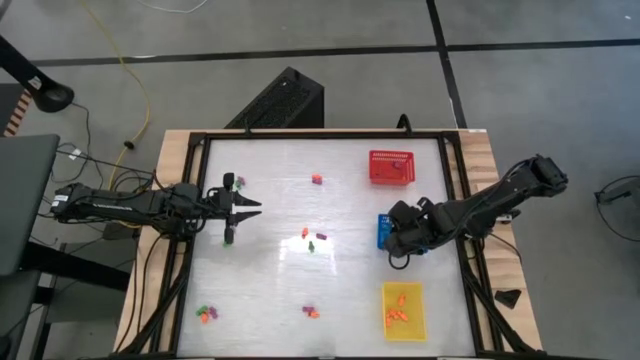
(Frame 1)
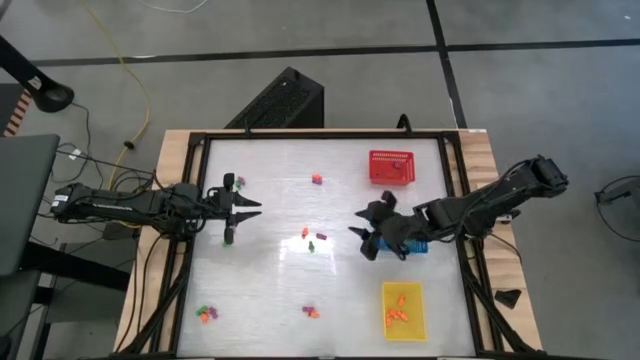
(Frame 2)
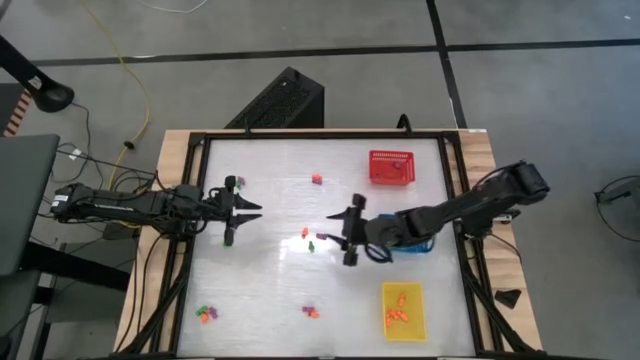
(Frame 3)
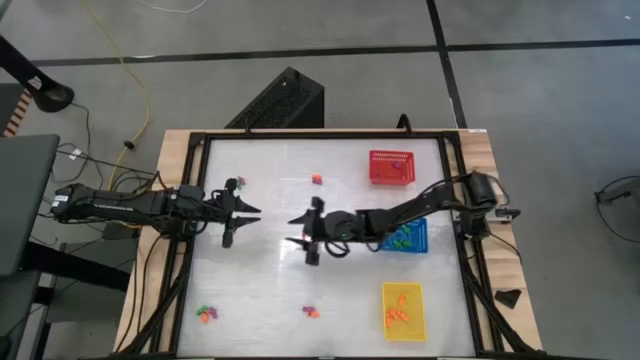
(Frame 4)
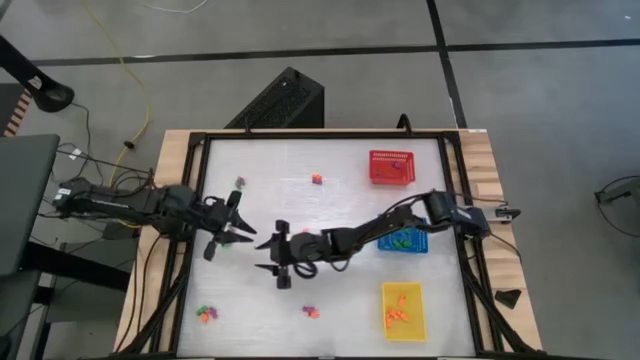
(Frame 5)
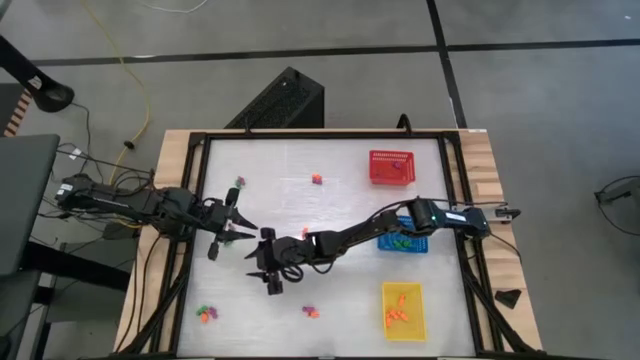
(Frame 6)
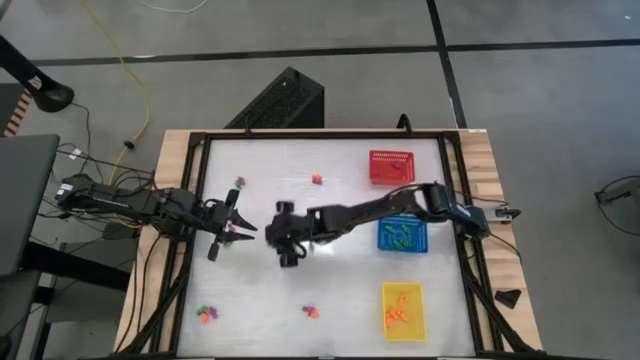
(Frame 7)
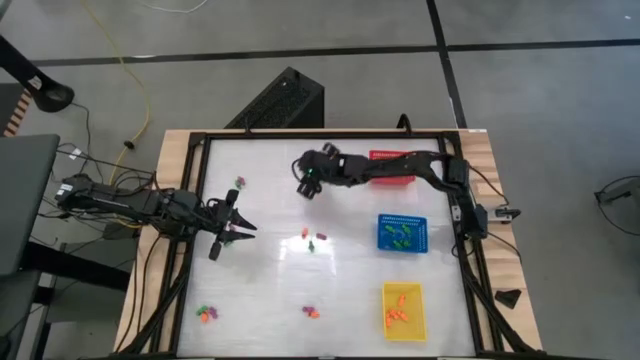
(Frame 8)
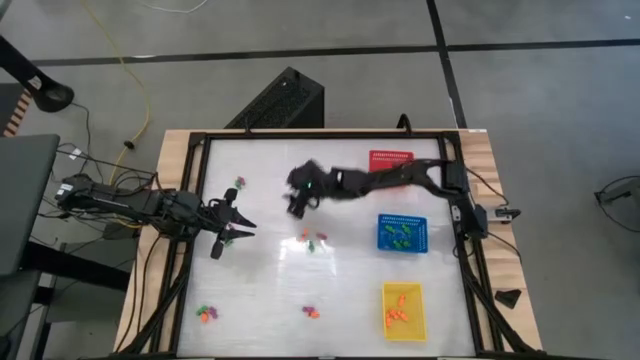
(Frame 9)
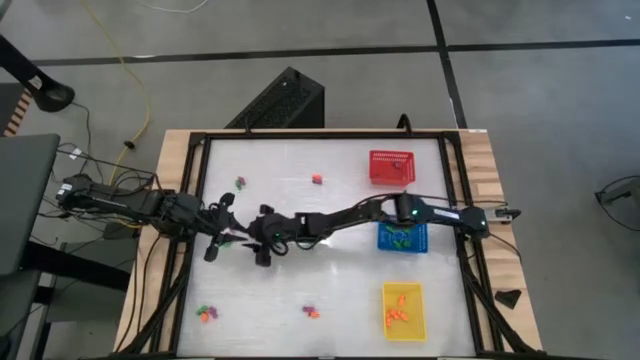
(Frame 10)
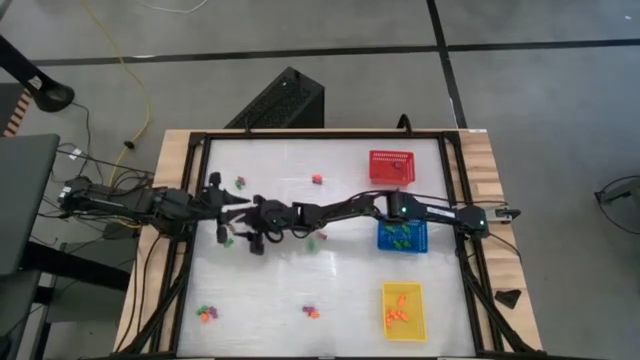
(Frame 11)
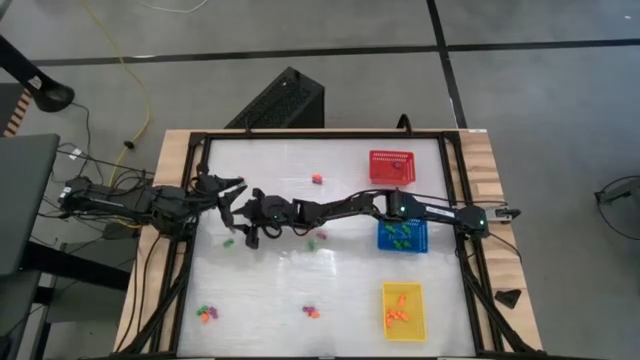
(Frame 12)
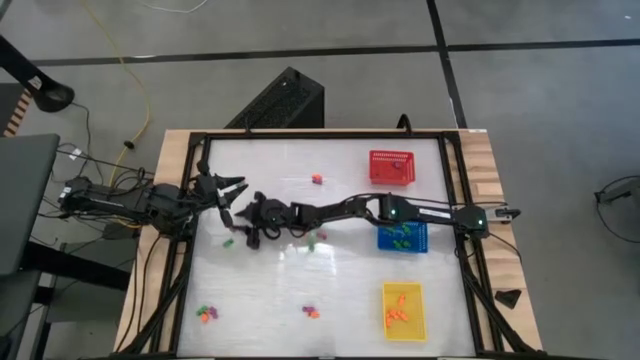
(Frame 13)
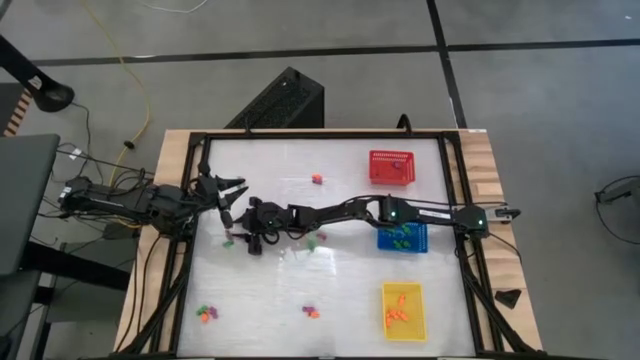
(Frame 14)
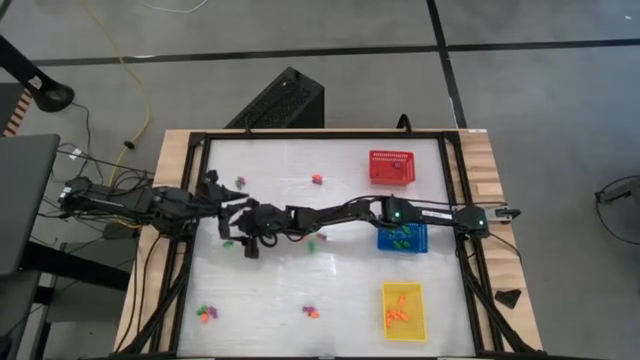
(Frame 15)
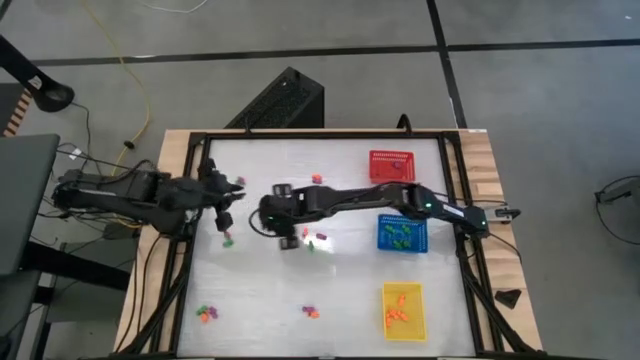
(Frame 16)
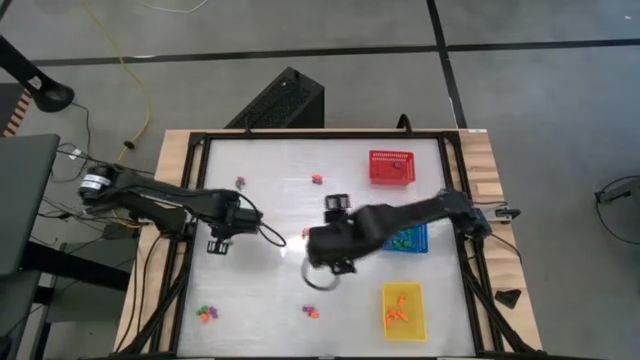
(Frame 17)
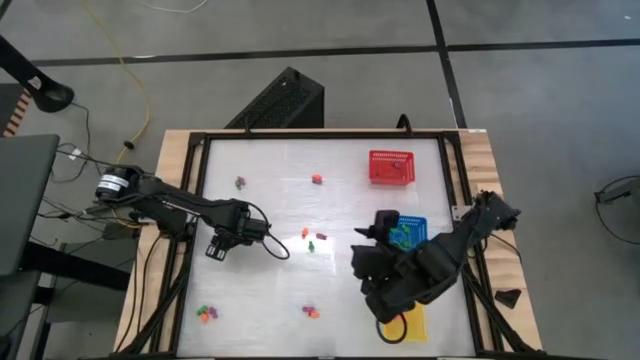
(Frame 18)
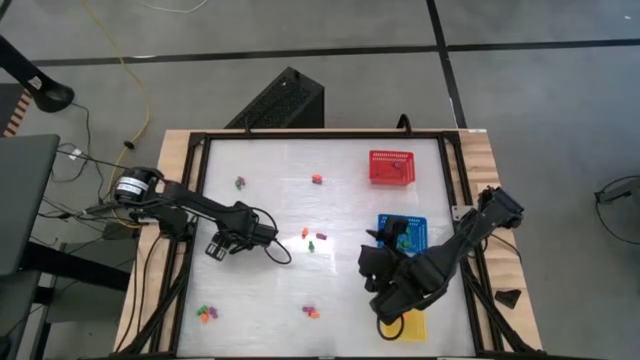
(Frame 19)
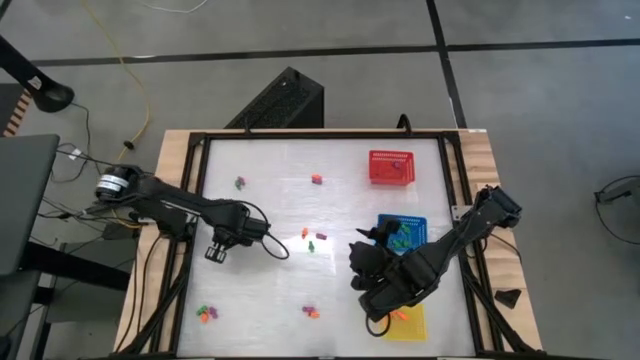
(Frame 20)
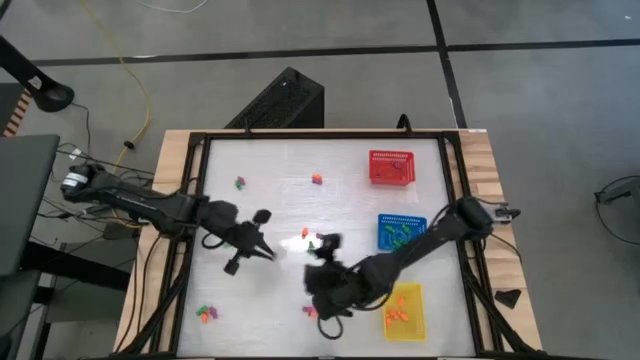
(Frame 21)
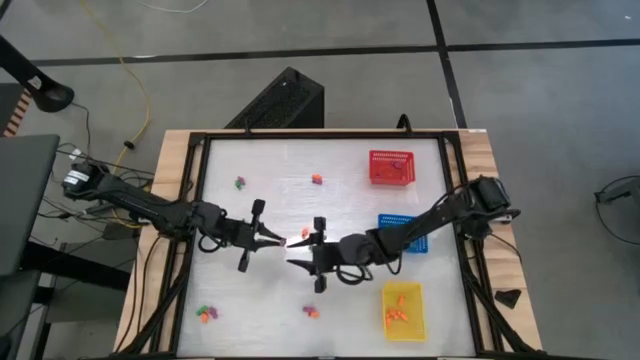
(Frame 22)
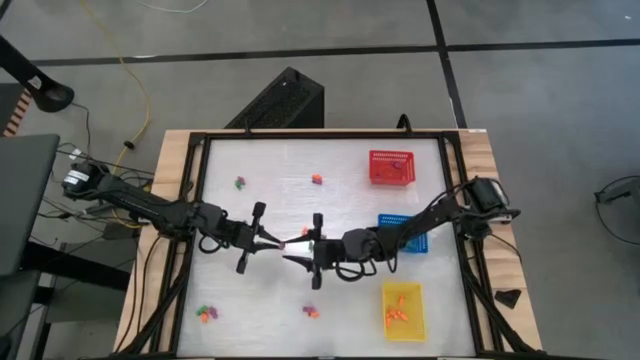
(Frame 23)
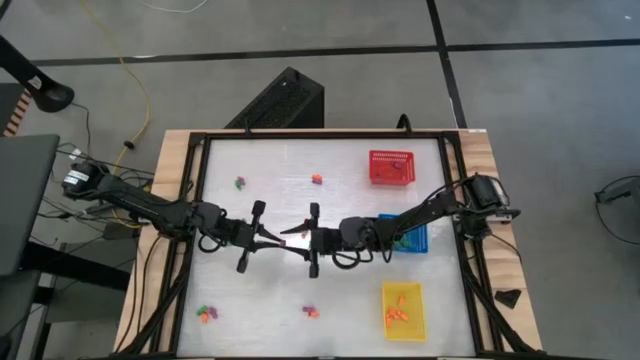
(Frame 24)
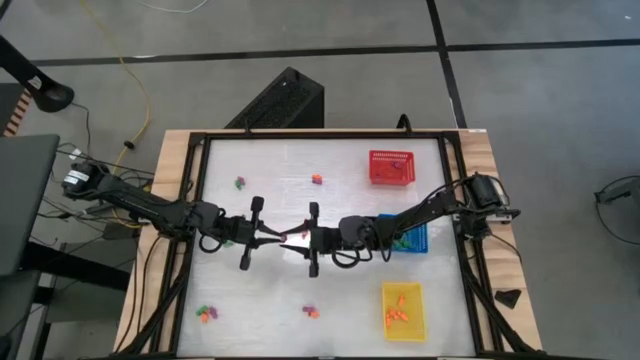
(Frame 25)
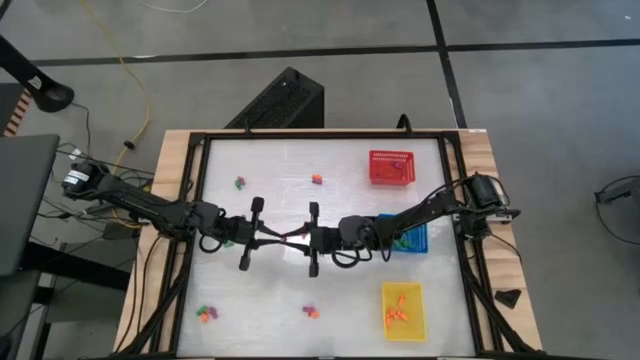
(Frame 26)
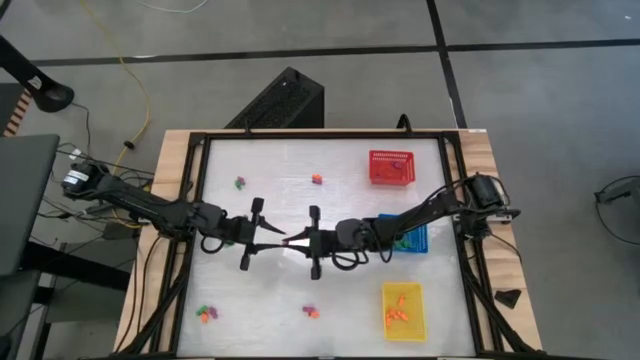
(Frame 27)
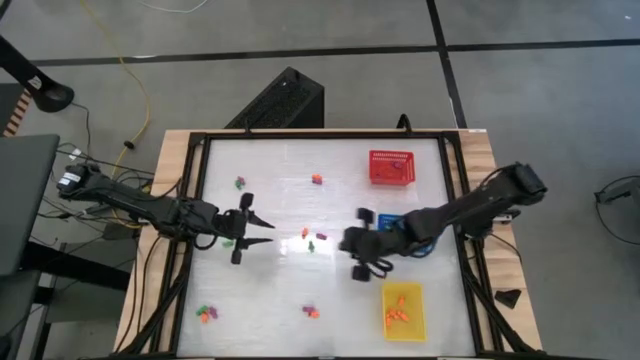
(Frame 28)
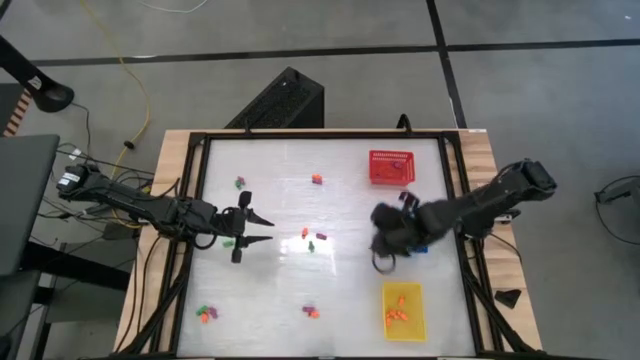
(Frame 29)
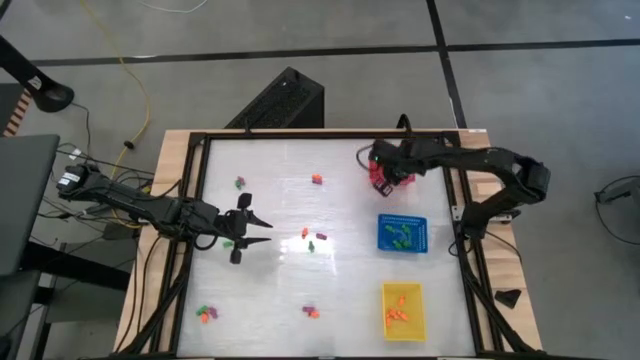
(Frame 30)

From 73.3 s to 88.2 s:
Task: Sort Halloween decoration
Put the violet skeleton toy into the red basket

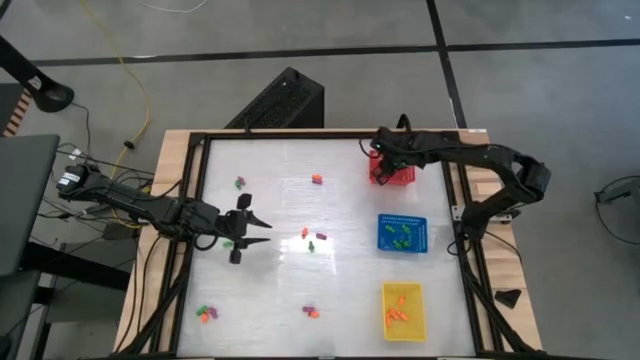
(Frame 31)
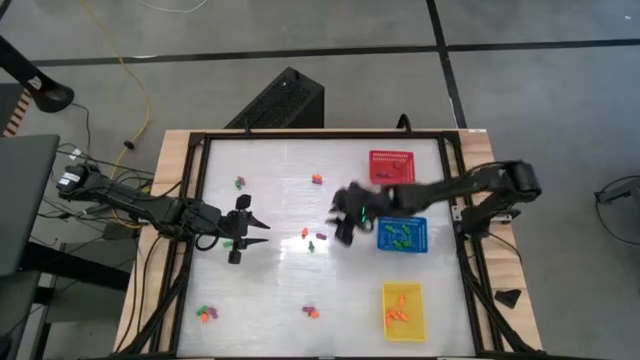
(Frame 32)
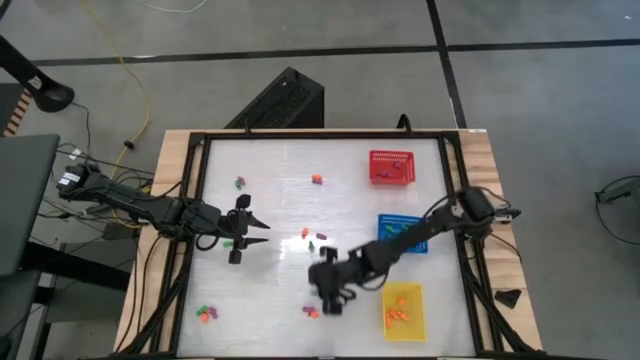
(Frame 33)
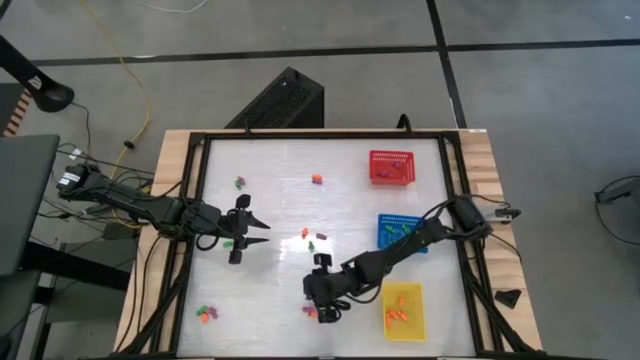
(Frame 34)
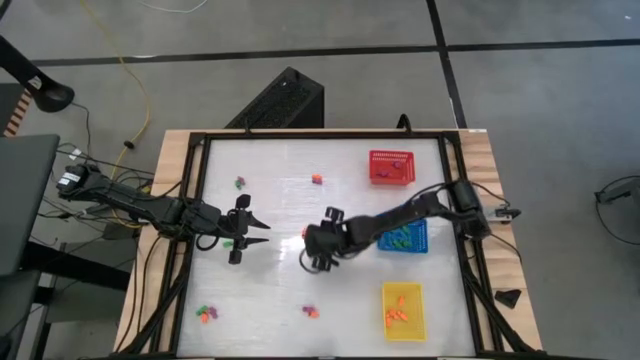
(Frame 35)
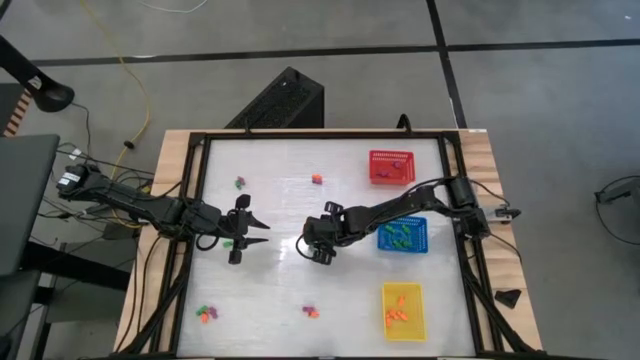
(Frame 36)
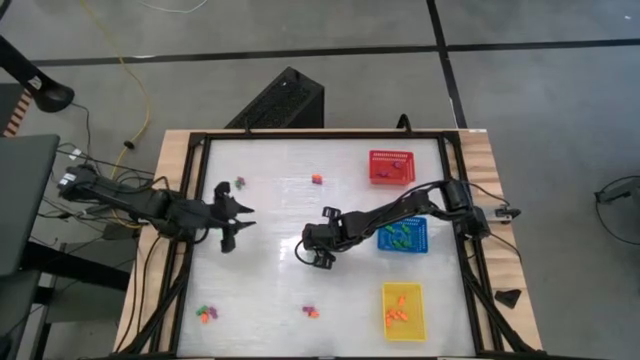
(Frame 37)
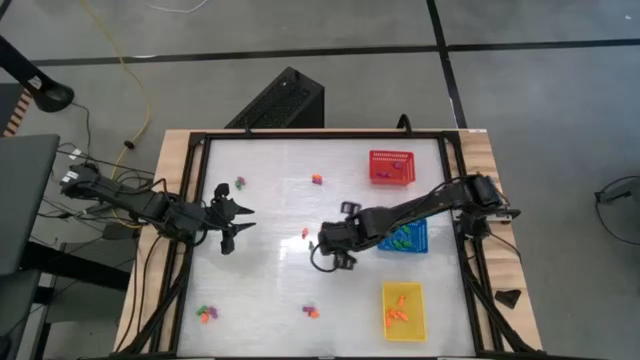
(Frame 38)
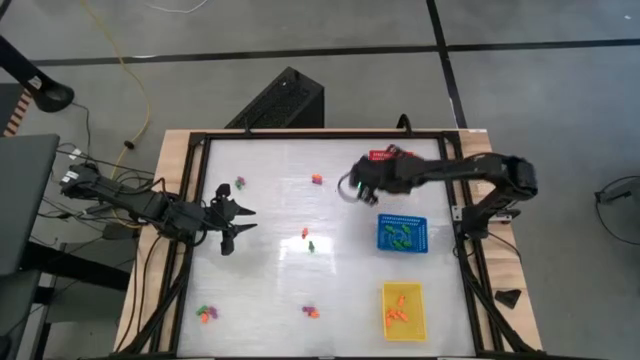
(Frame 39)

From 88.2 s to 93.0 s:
Put the violet skeleton toy into the red basket

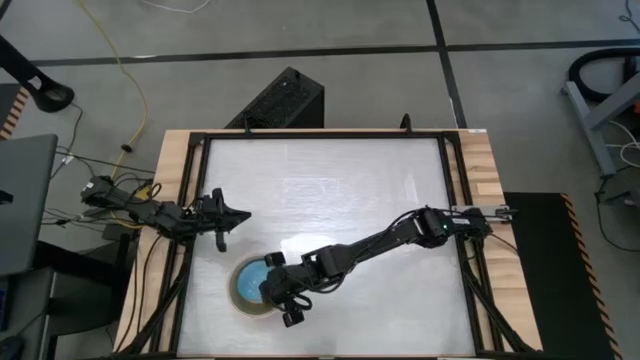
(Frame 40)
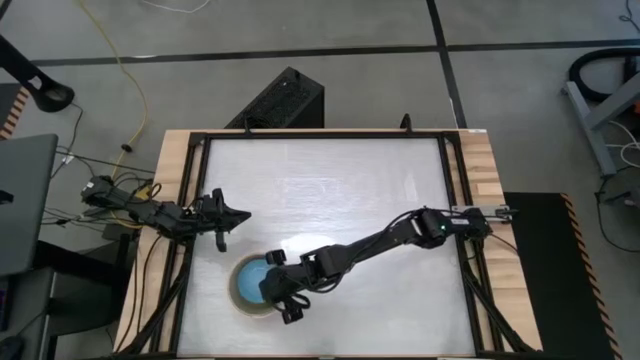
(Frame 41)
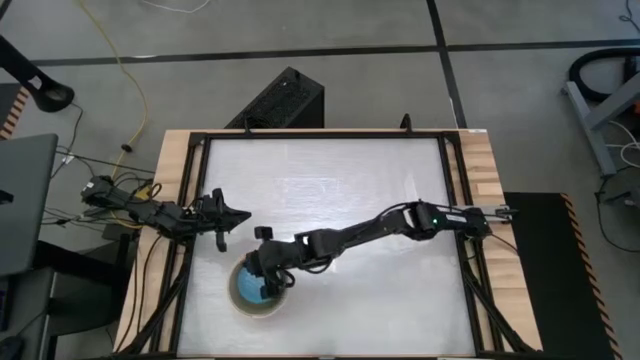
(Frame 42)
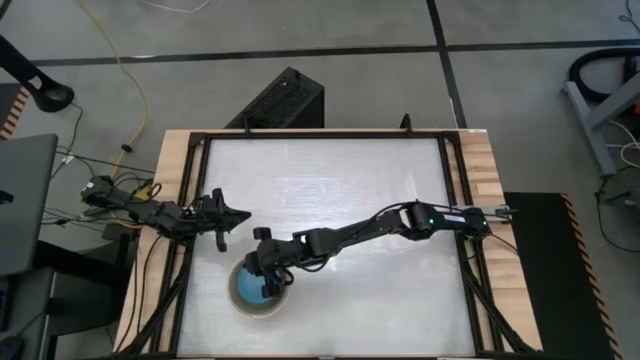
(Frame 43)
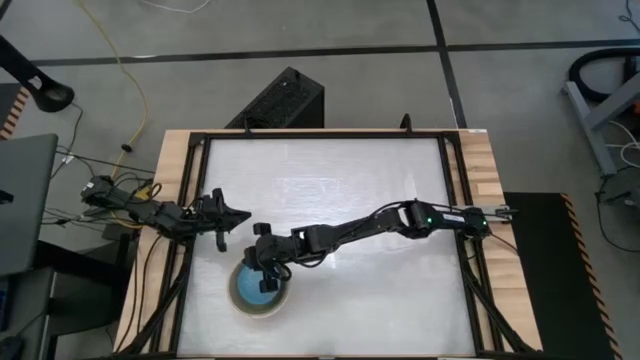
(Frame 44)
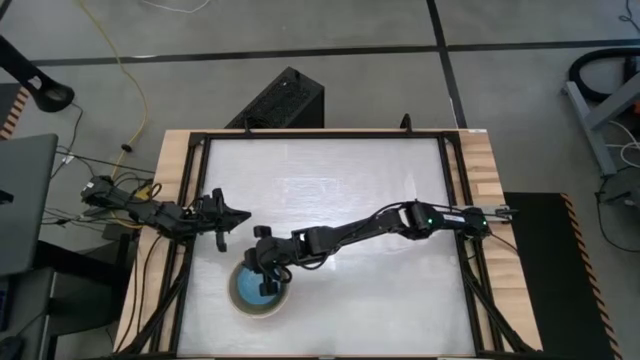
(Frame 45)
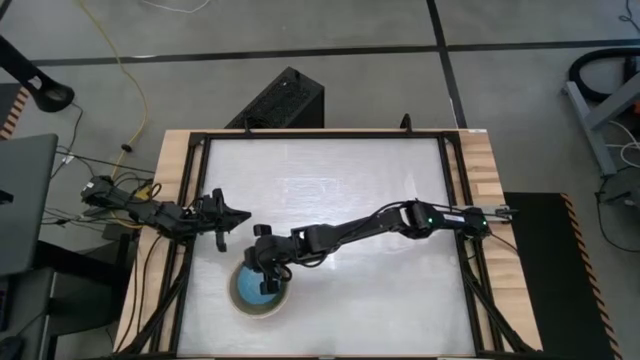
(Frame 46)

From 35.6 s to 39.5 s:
Task: Nest bowls inside each other by size order
Adjust the blue bowl
